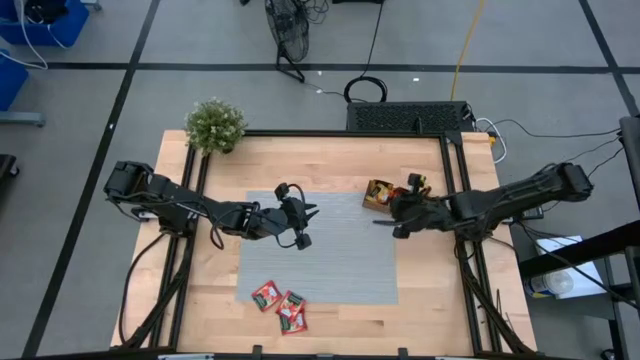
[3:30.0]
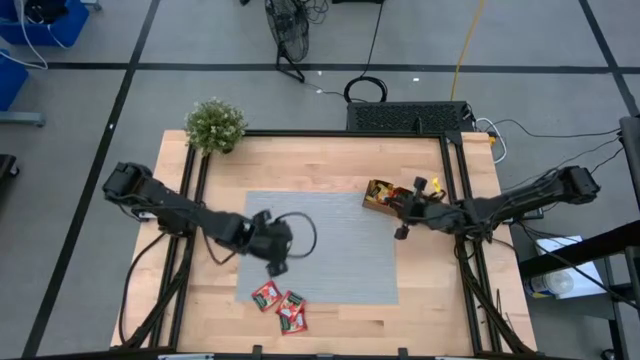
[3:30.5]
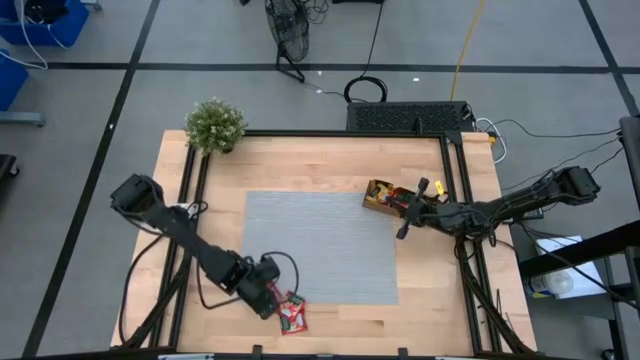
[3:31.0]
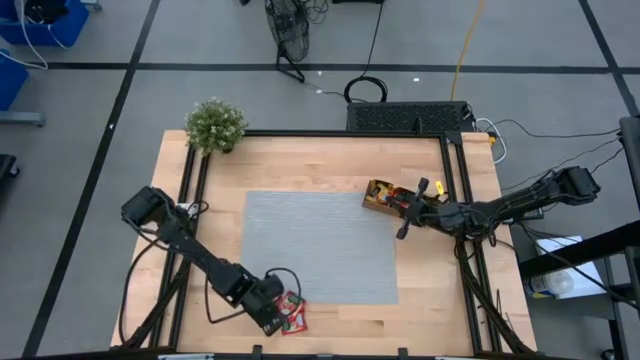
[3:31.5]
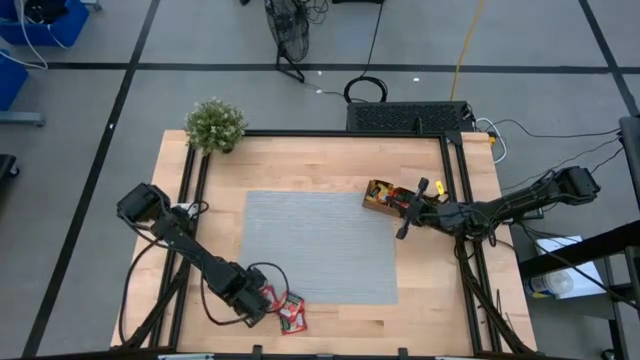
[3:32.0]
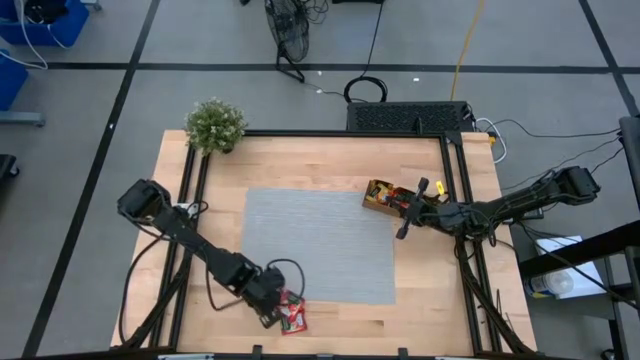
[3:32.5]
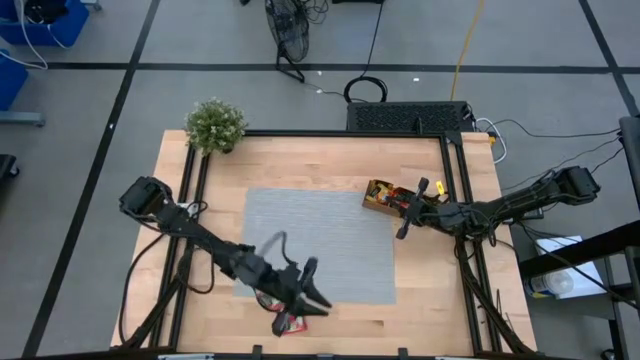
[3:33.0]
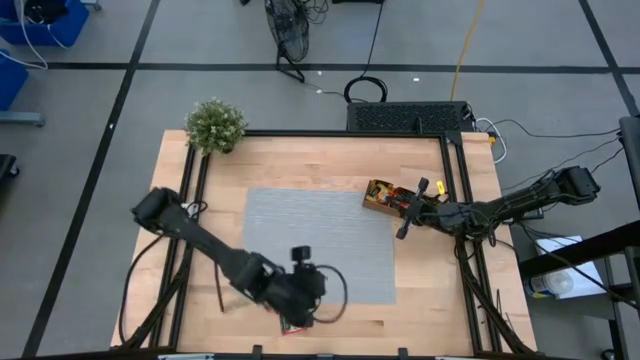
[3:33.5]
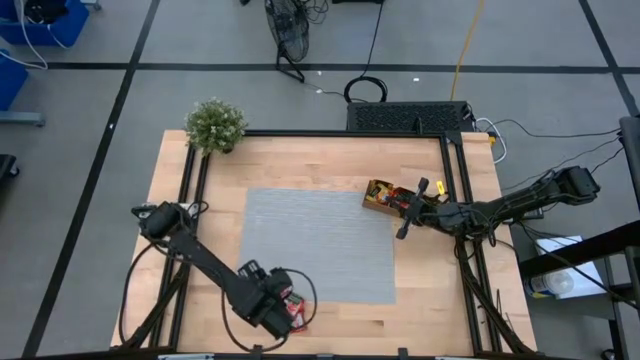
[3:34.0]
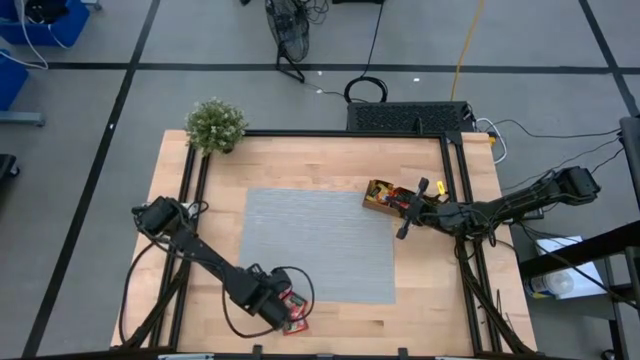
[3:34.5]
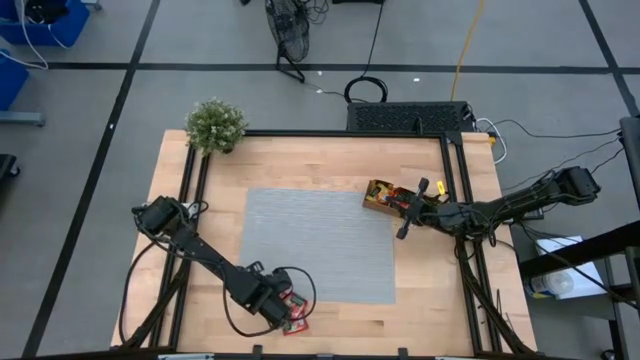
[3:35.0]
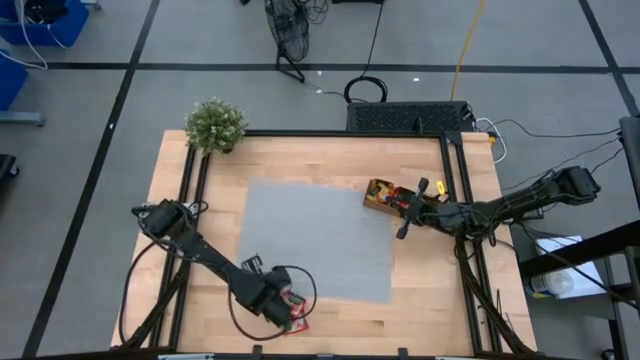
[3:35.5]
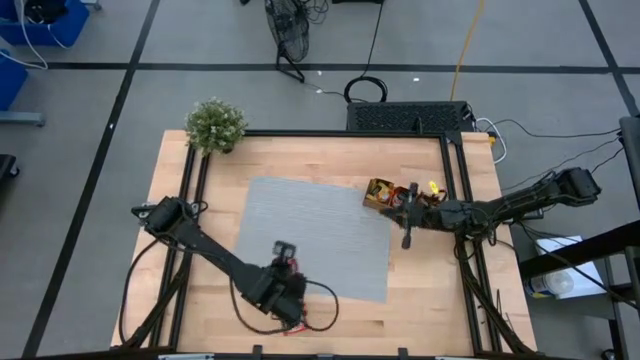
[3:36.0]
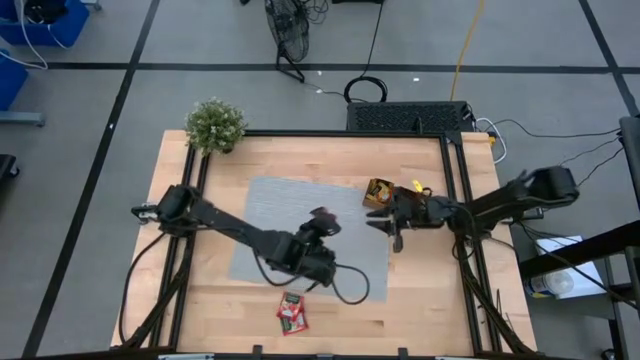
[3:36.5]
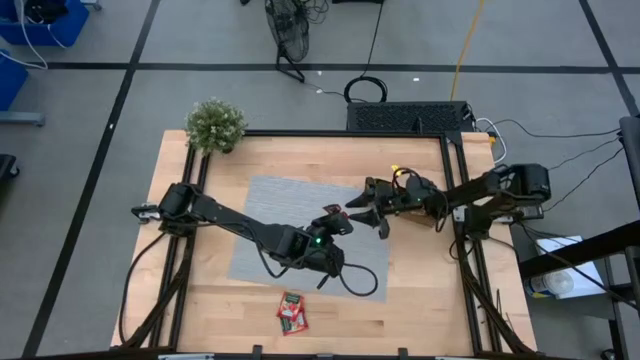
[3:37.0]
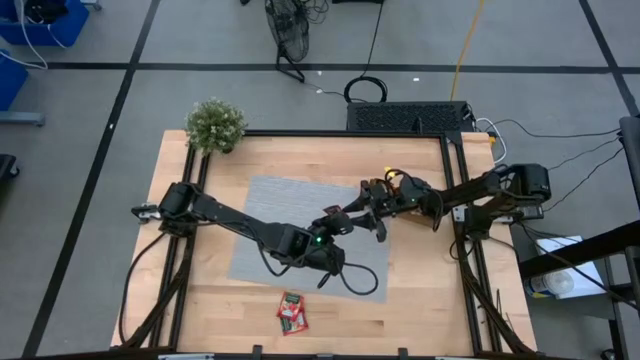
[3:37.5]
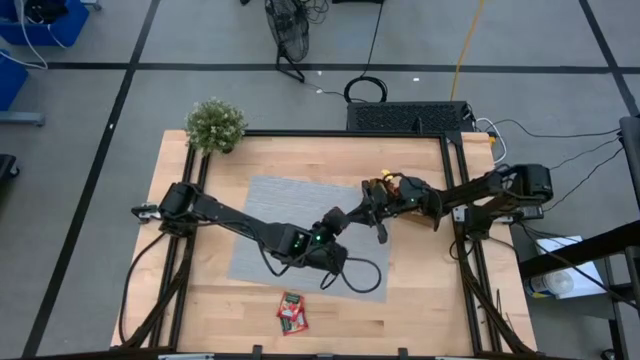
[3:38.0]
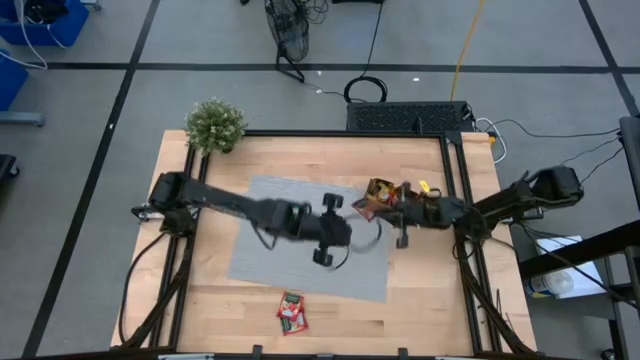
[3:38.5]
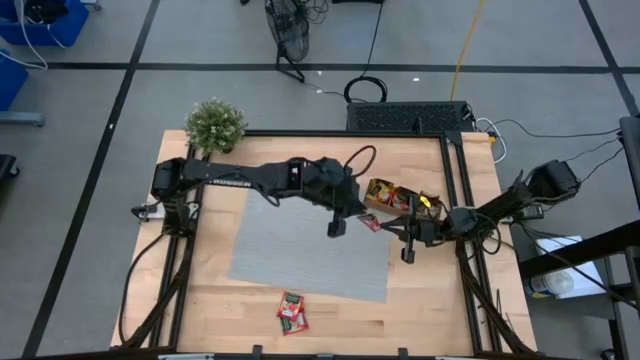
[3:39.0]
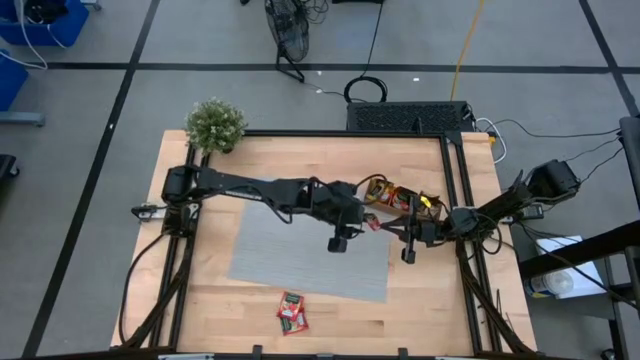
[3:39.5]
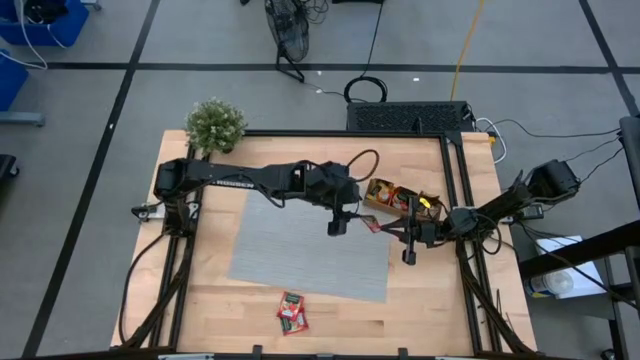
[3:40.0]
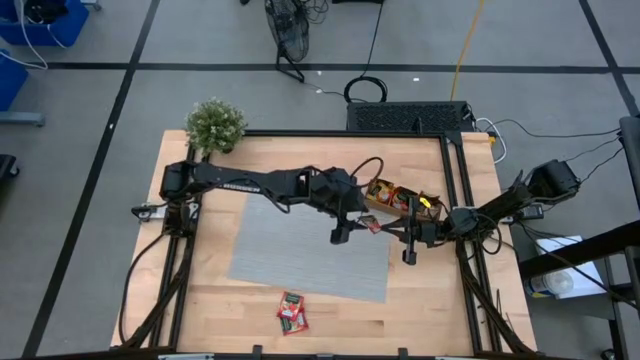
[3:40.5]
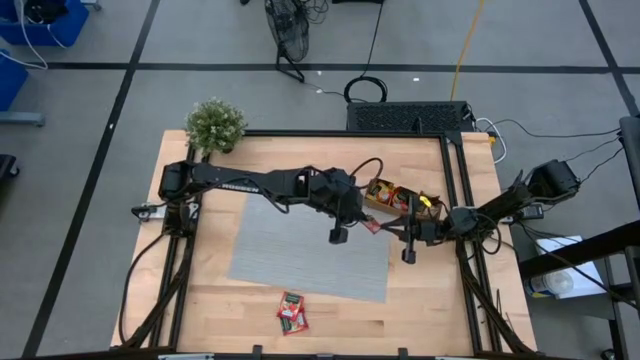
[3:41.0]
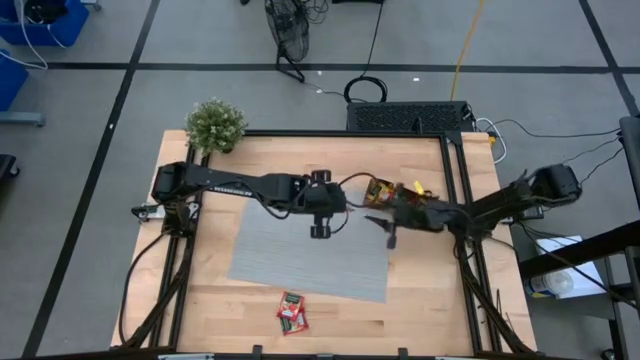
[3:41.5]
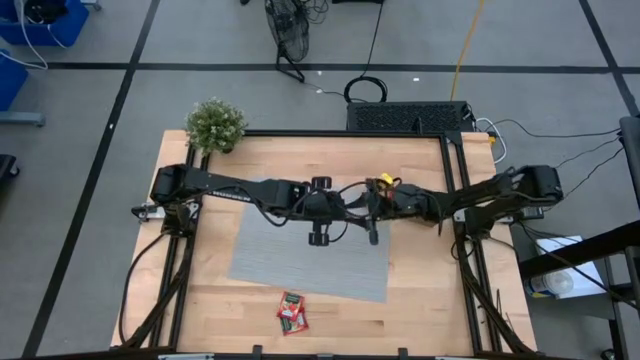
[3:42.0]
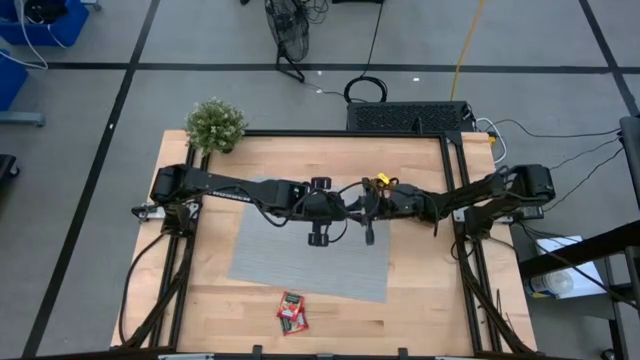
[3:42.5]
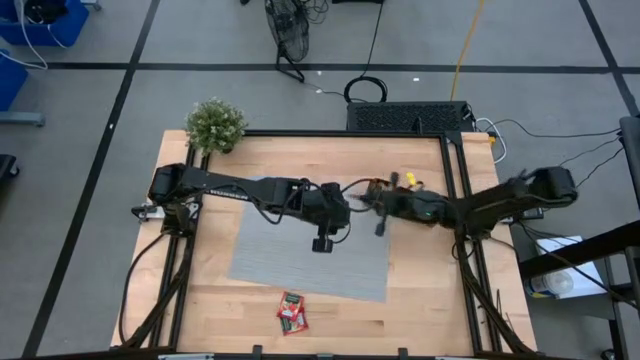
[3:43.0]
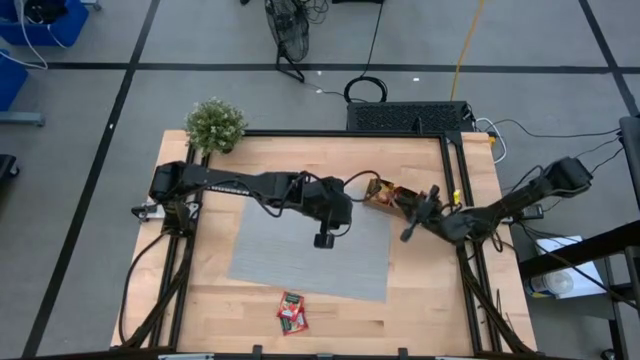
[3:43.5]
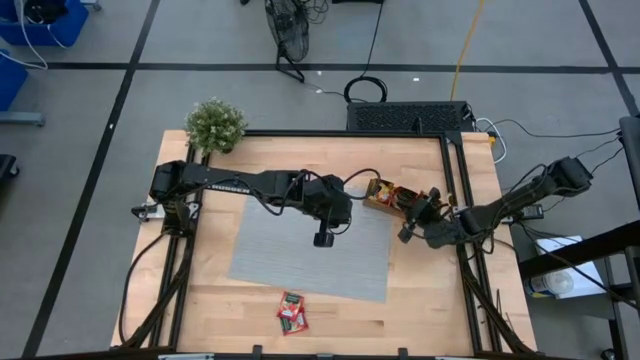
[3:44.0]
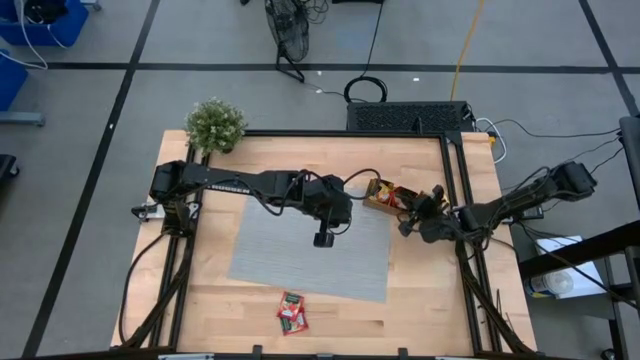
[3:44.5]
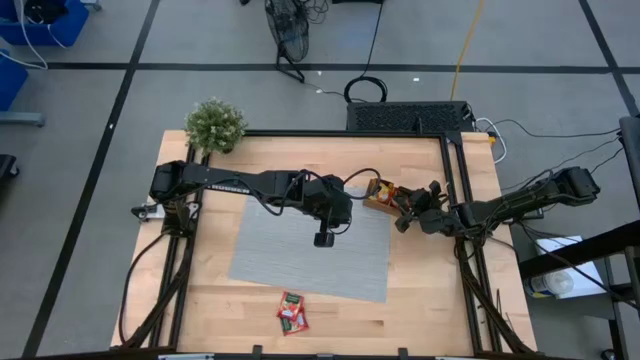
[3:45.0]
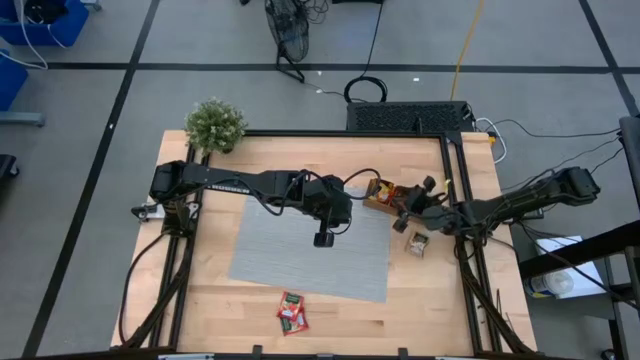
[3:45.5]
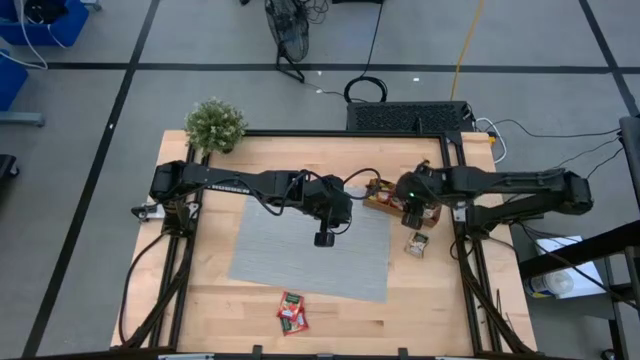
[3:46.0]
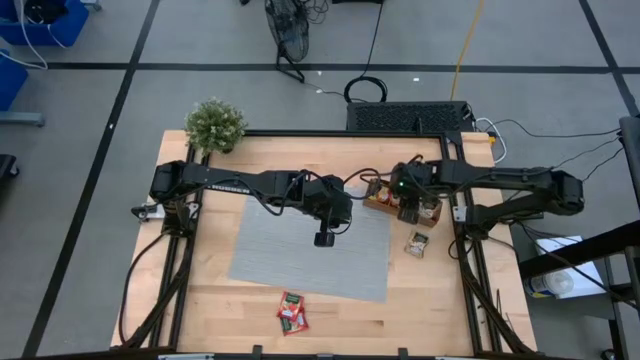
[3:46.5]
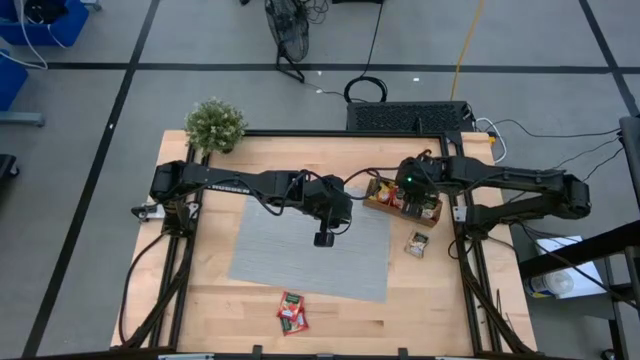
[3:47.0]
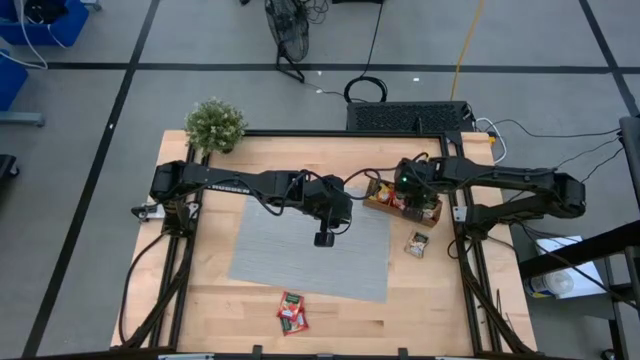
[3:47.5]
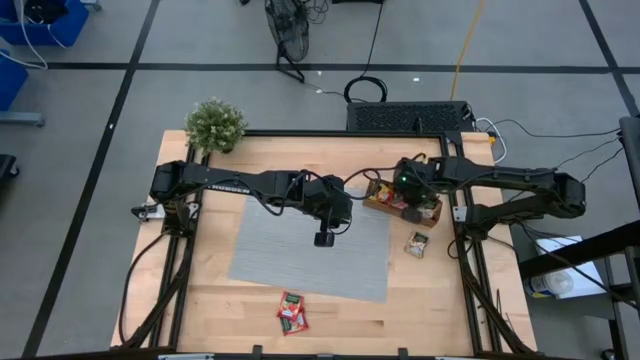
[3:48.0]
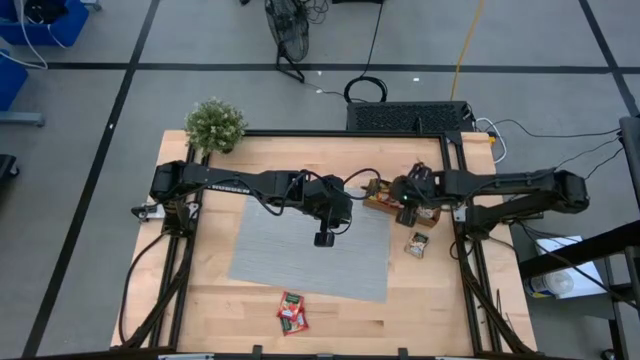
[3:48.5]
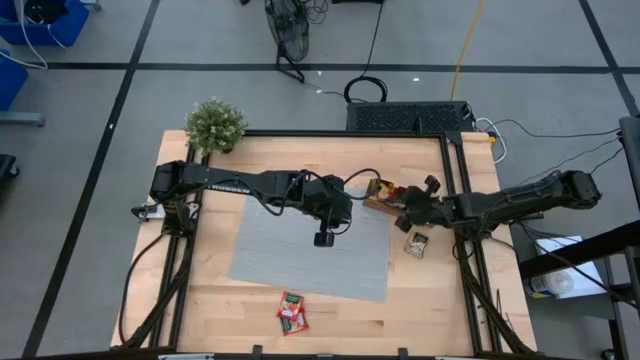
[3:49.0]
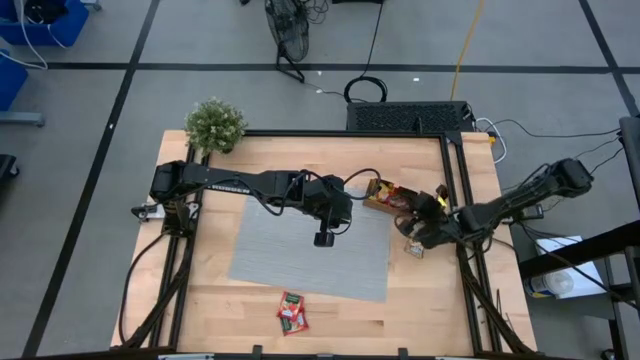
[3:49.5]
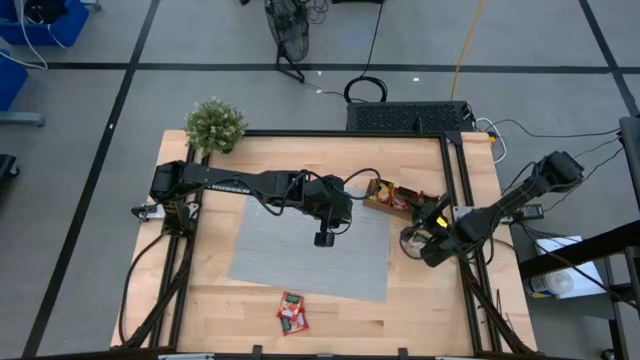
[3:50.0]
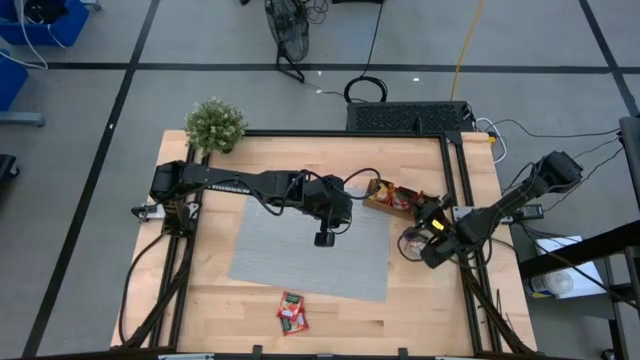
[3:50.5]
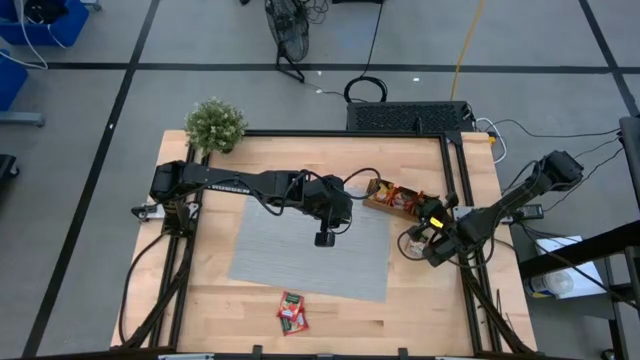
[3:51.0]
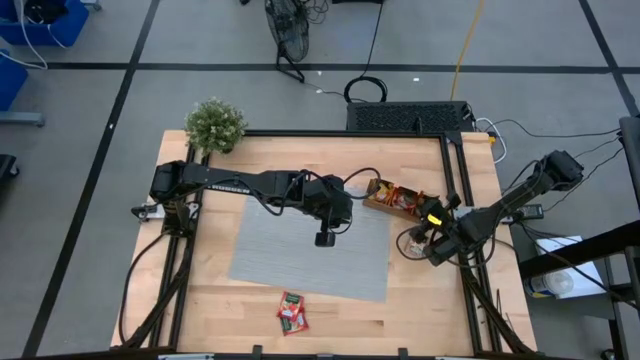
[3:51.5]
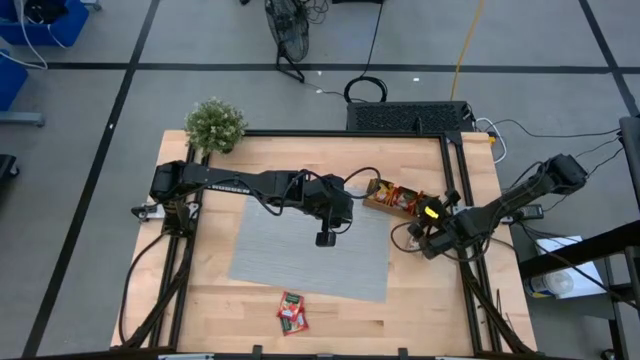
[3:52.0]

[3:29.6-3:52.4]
Task: Pick & Place Tea
Put the red tea bag into the middle section of the wooden organizer
